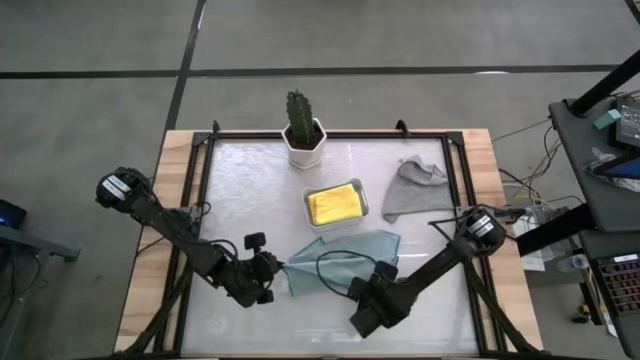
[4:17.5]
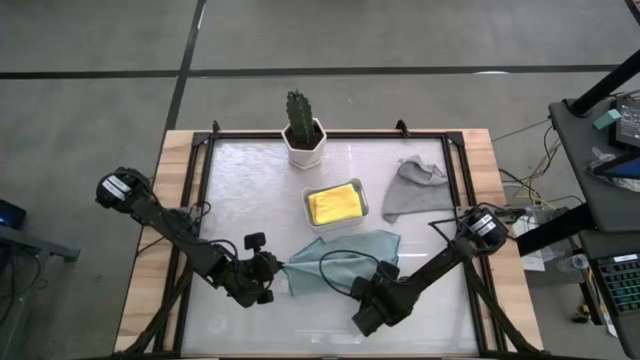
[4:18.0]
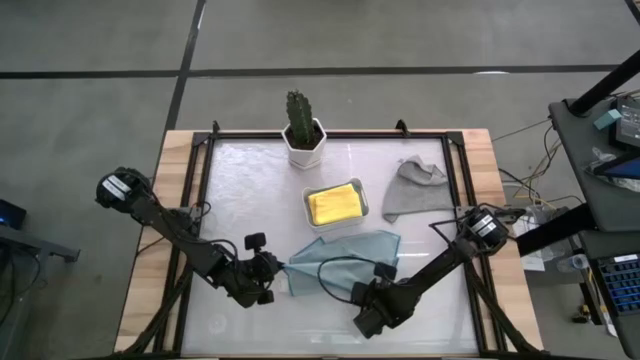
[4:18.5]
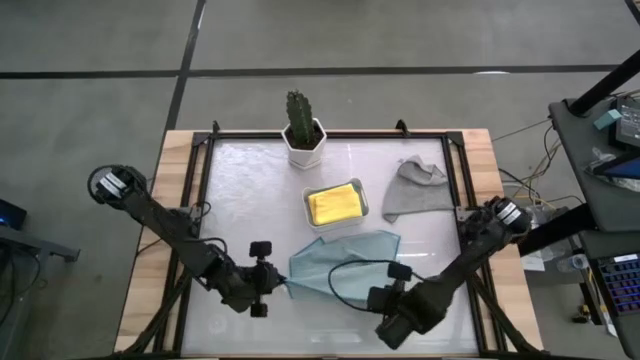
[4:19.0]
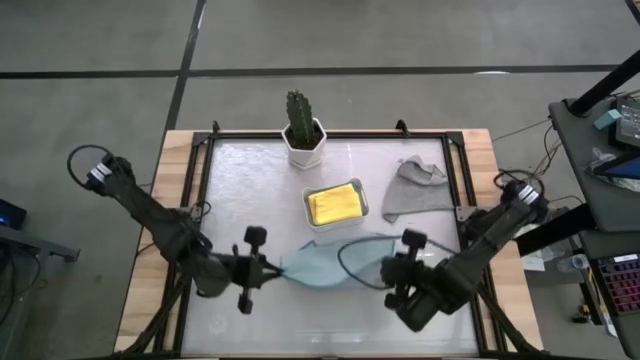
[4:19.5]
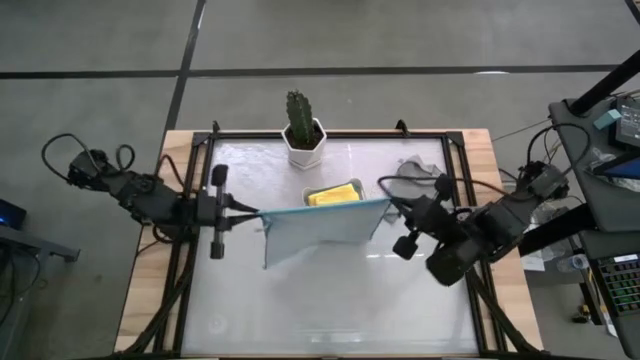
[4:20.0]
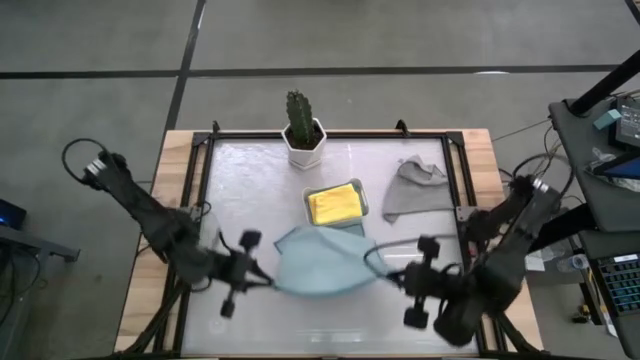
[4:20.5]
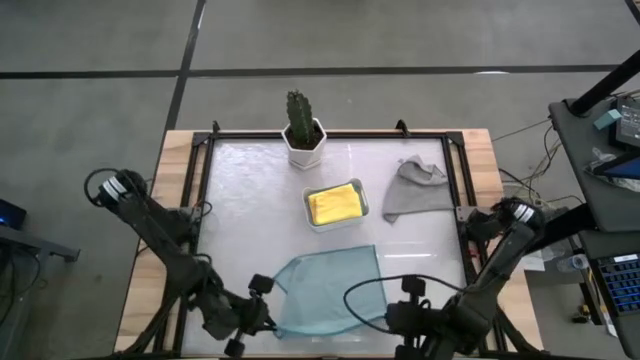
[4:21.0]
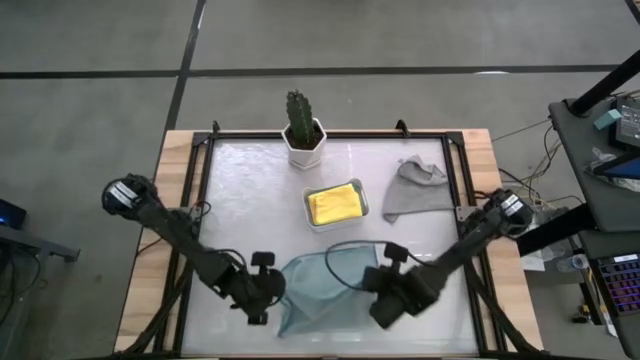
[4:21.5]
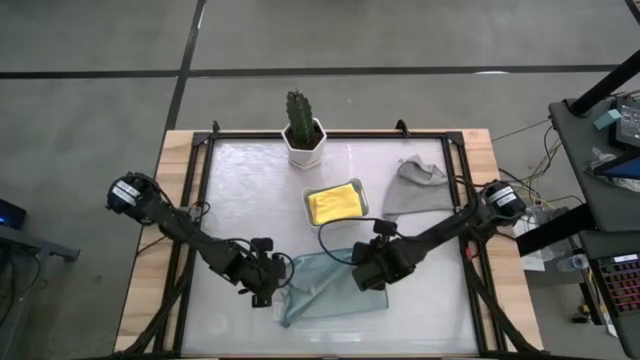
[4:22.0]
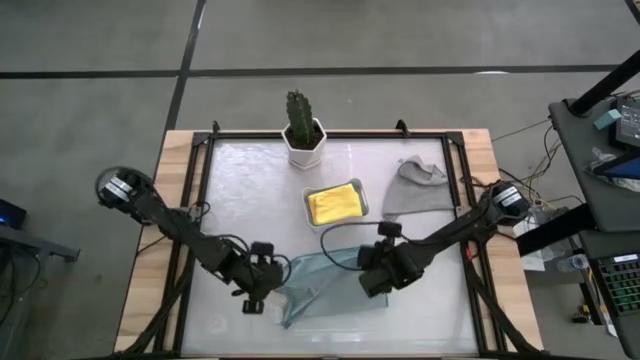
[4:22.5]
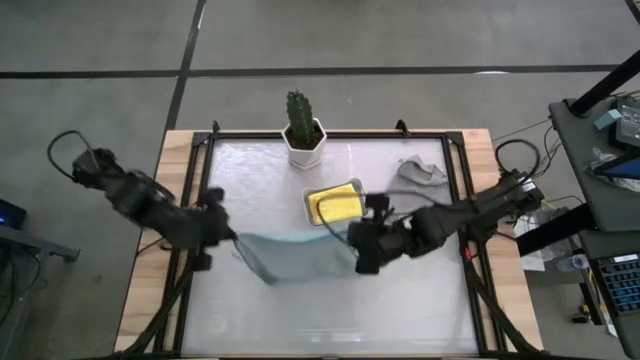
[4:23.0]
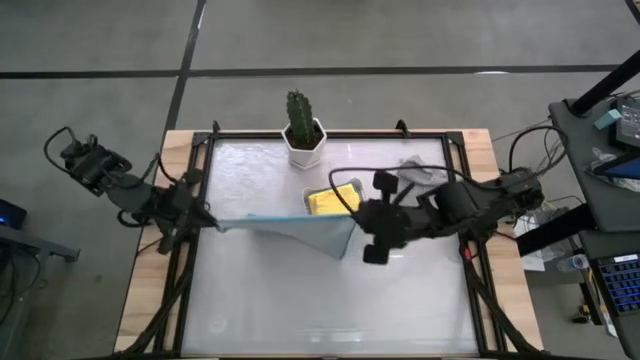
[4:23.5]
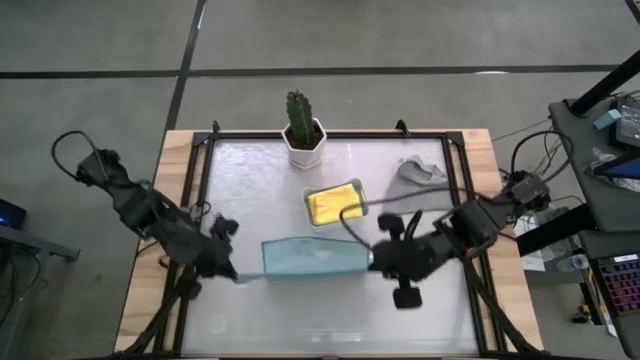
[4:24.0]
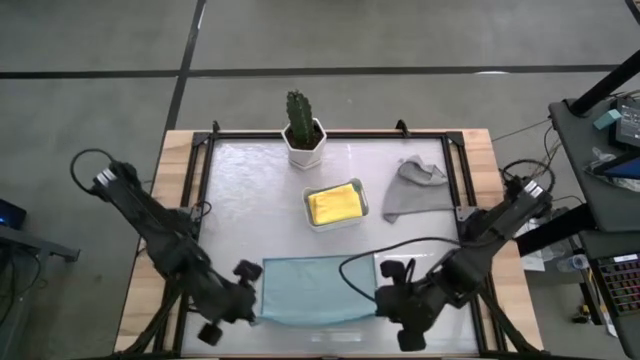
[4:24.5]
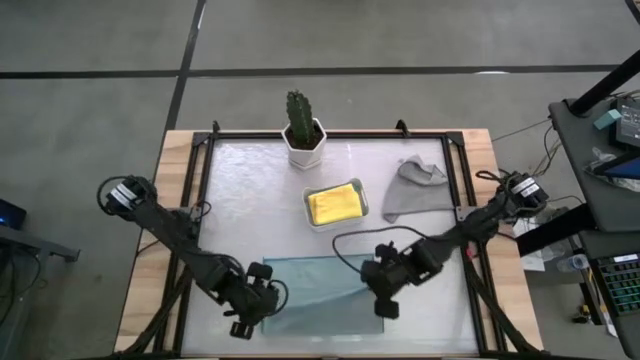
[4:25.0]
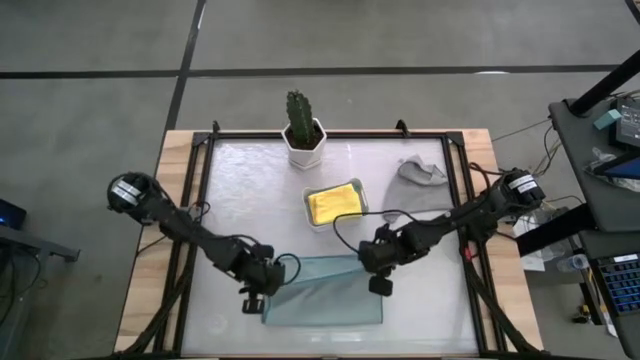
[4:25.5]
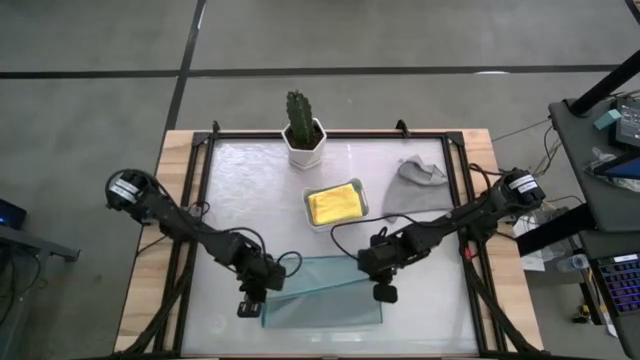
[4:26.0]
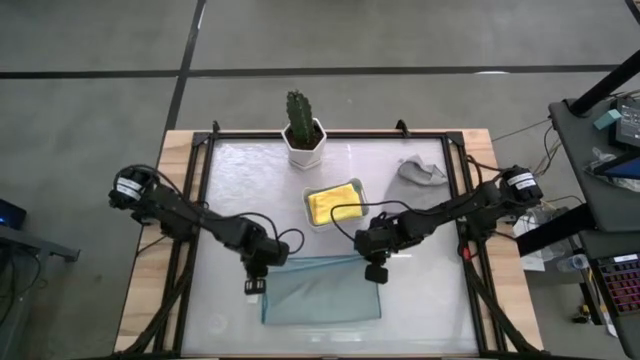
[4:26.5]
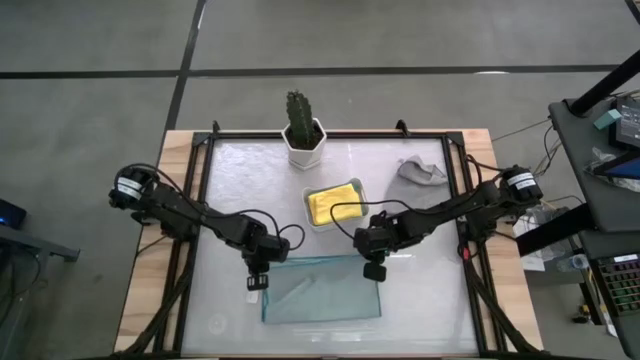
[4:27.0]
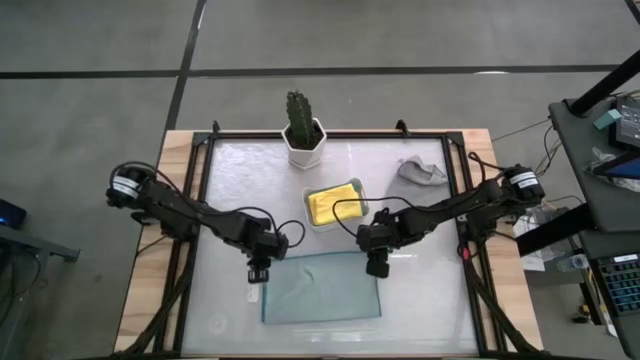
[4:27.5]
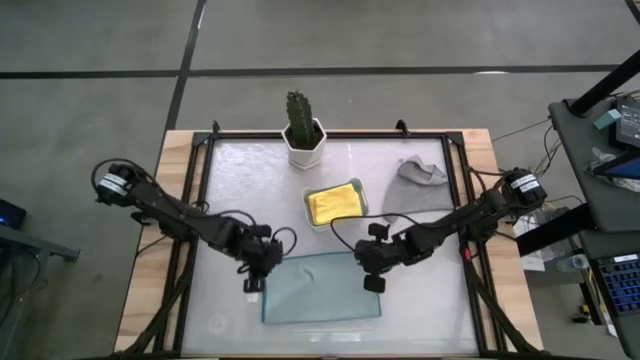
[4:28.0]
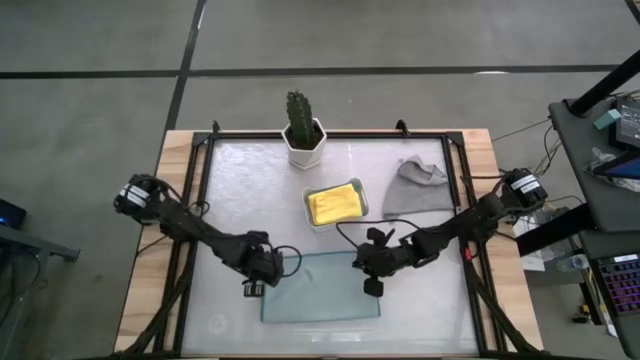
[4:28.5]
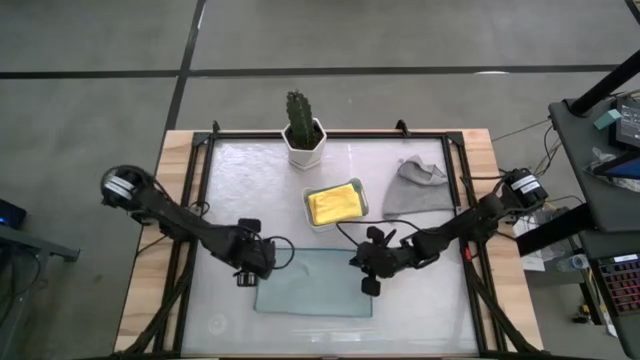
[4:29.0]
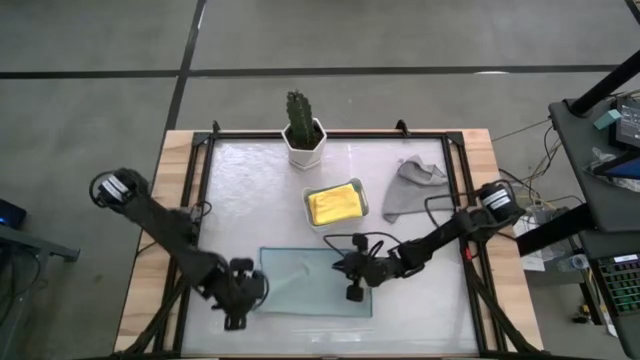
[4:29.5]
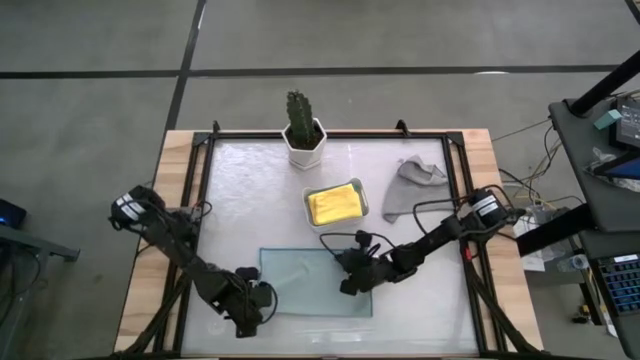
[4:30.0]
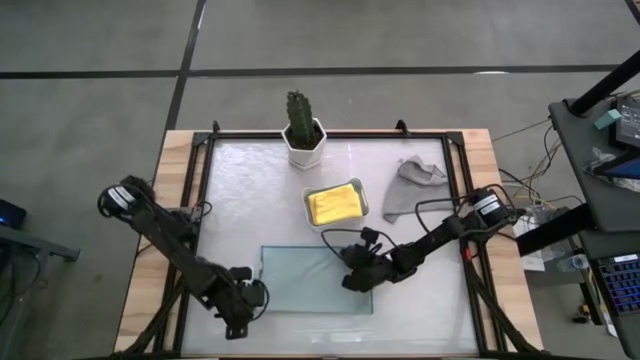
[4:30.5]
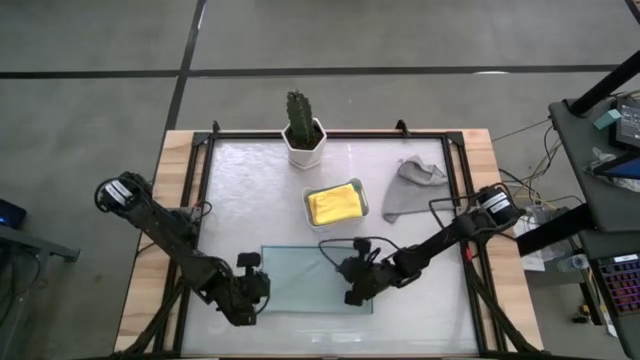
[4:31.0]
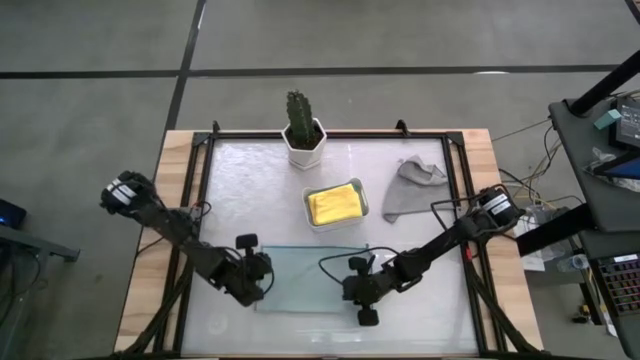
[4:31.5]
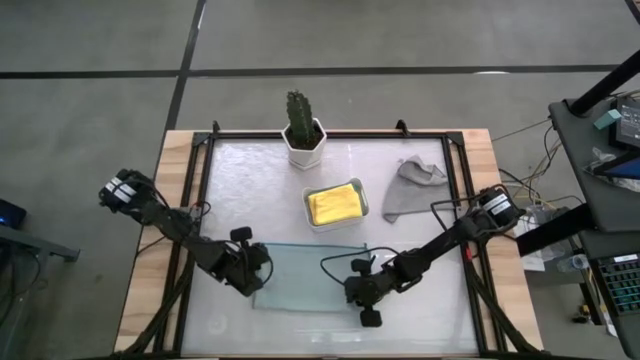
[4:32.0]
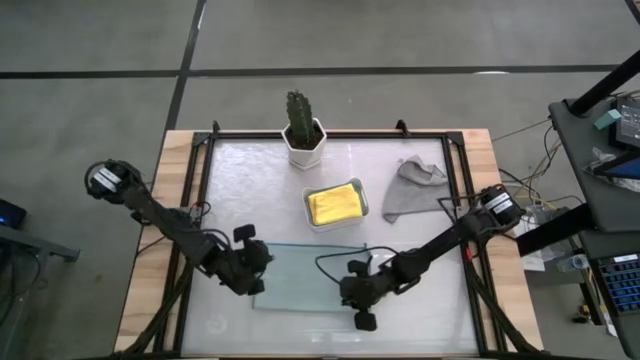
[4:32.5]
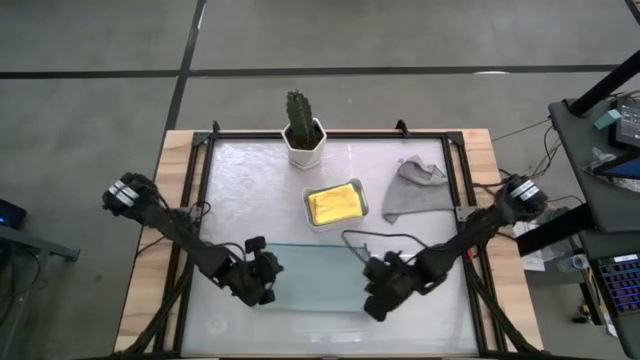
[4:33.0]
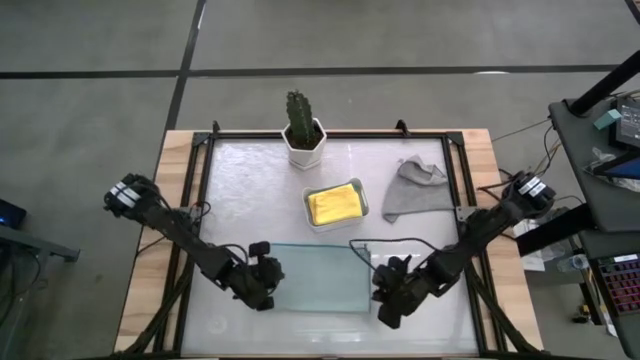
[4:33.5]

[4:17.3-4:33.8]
Task: Fold microfiber towels
Fold the light blue towel

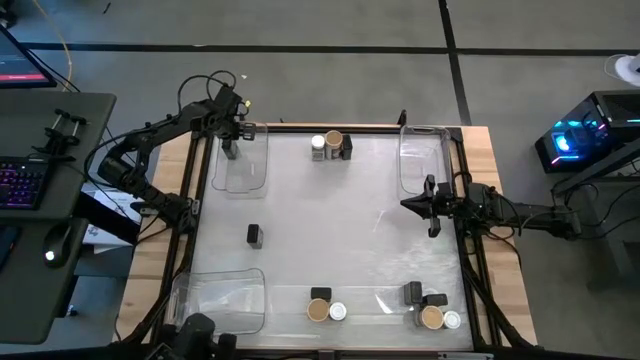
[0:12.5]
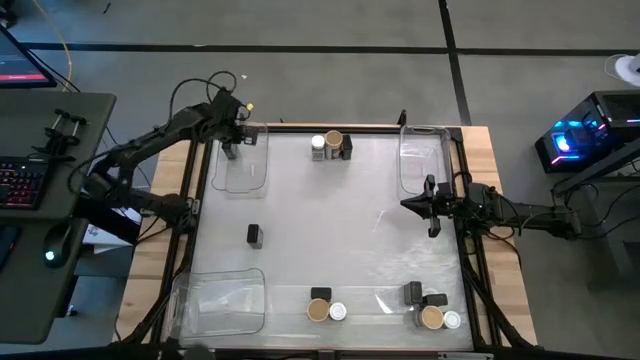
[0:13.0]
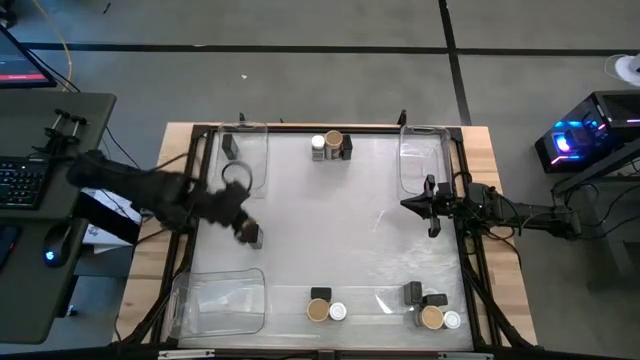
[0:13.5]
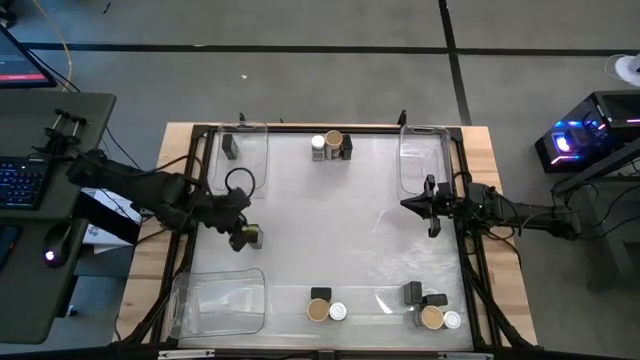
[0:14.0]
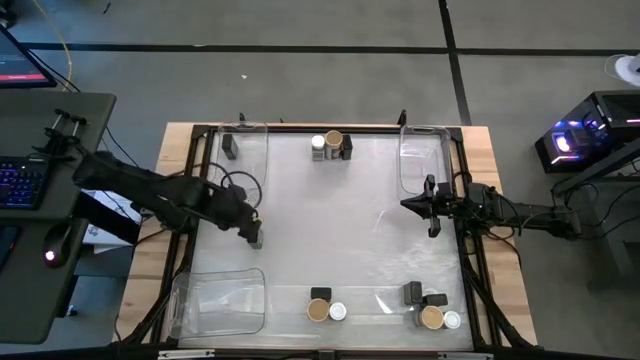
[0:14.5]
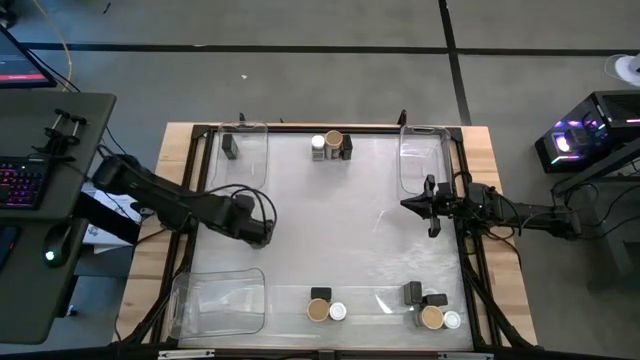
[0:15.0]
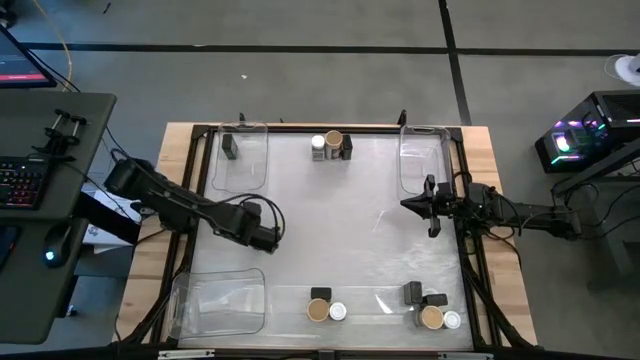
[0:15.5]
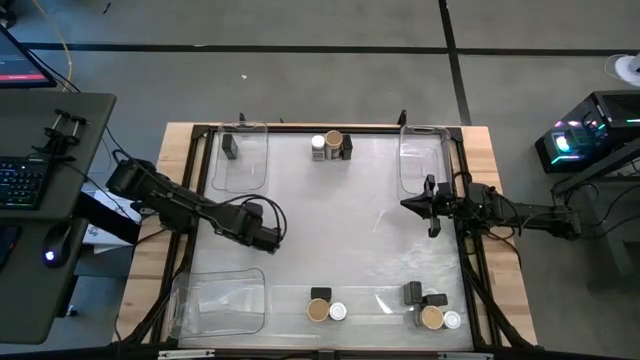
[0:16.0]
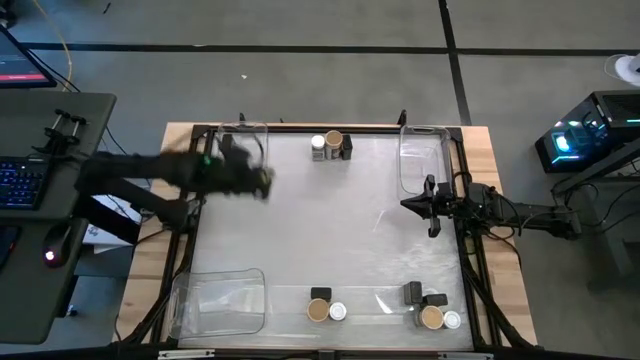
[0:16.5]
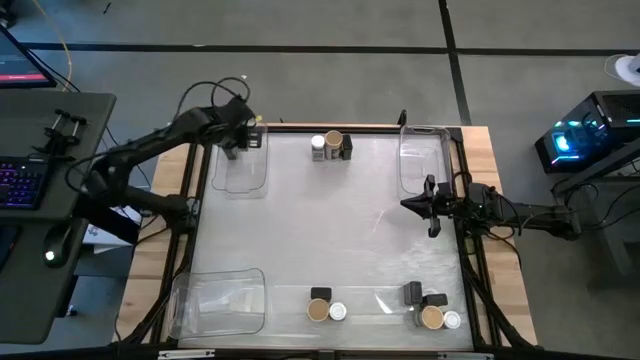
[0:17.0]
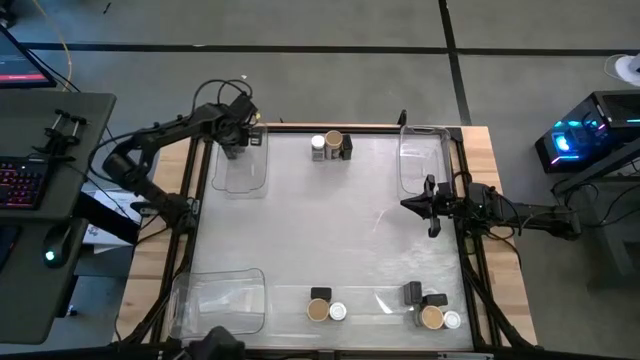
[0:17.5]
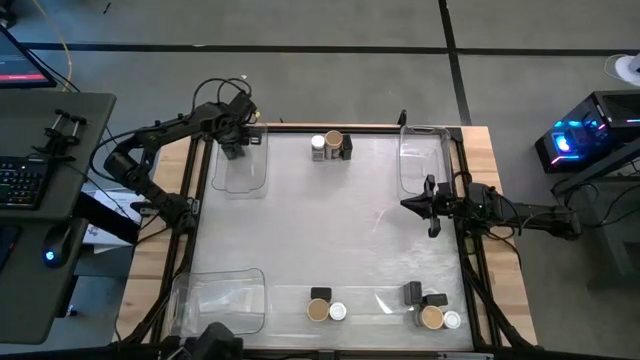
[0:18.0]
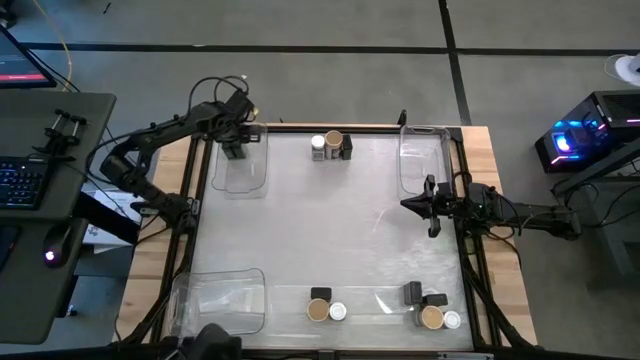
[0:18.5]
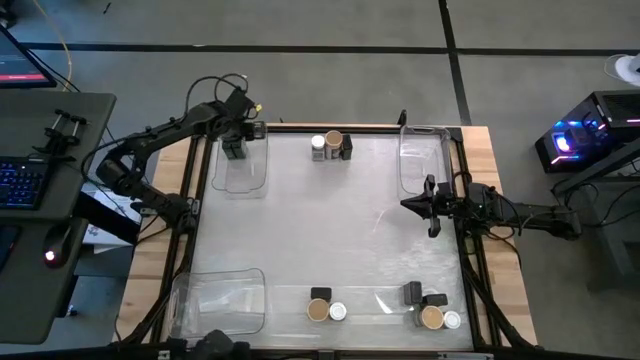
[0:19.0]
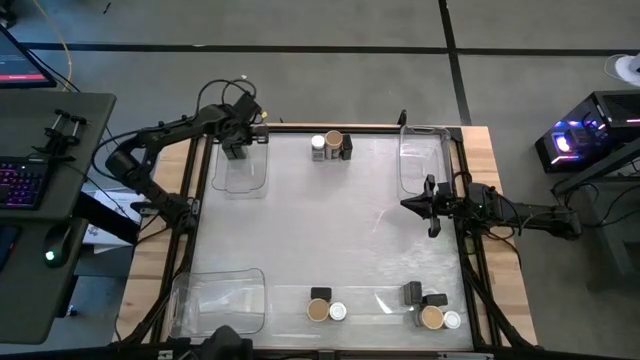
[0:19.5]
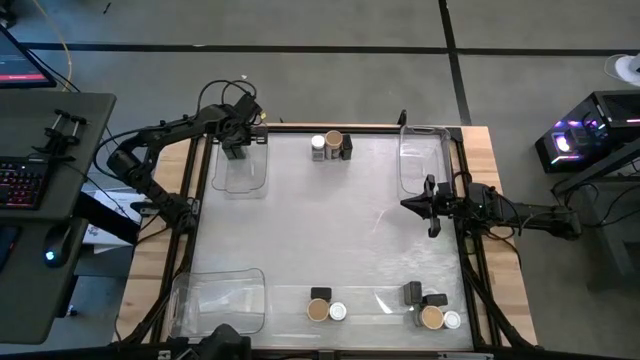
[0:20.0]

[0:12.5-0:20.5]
Task: Sort spices by type
Put the black seasoning can into the top left transparent bin
